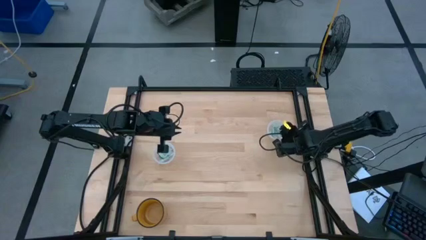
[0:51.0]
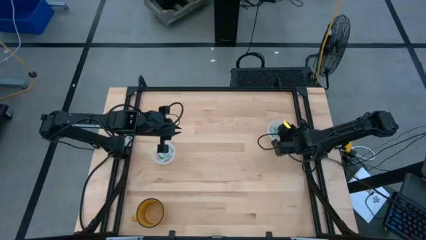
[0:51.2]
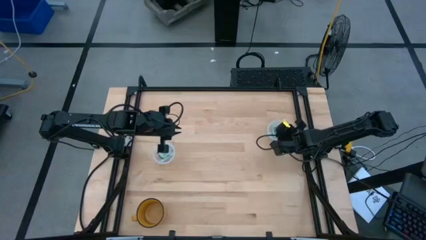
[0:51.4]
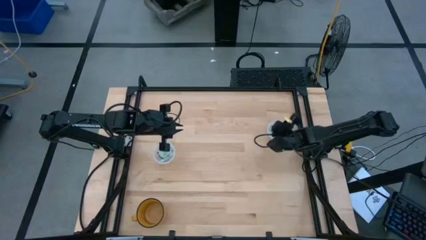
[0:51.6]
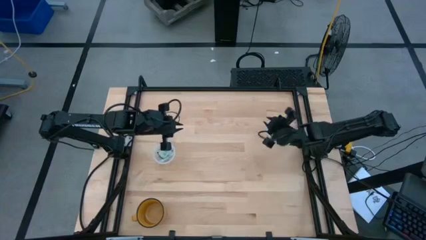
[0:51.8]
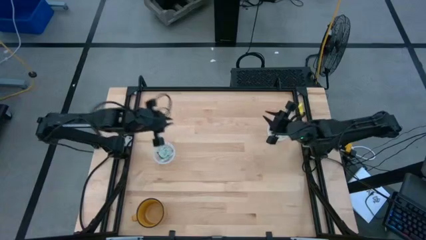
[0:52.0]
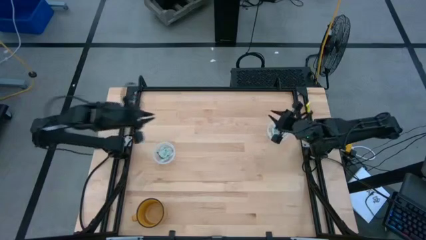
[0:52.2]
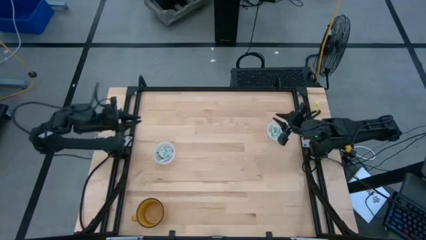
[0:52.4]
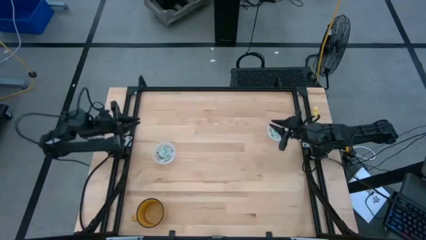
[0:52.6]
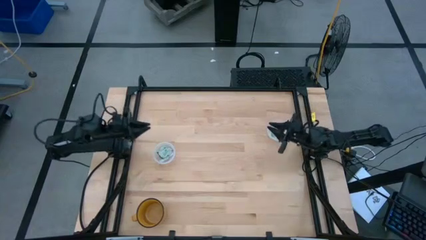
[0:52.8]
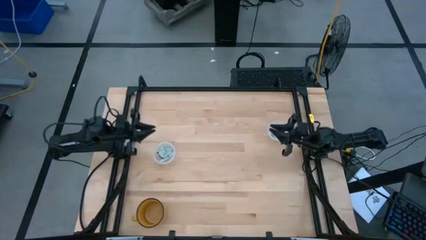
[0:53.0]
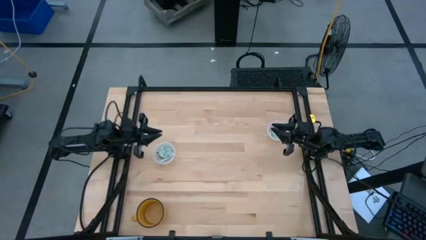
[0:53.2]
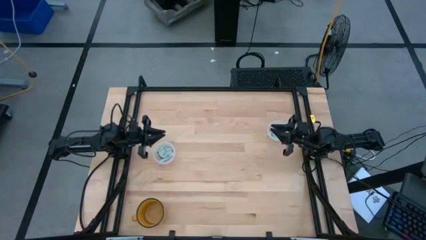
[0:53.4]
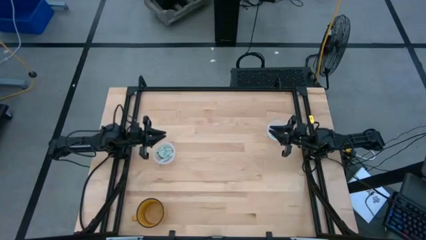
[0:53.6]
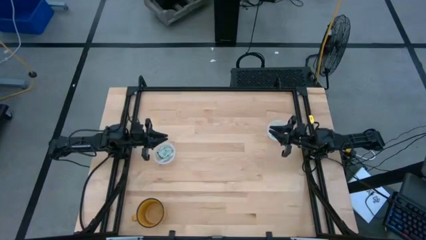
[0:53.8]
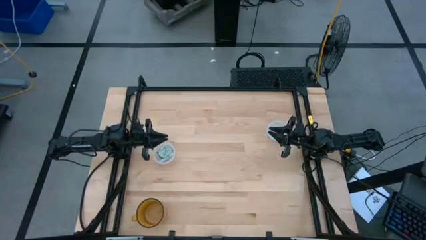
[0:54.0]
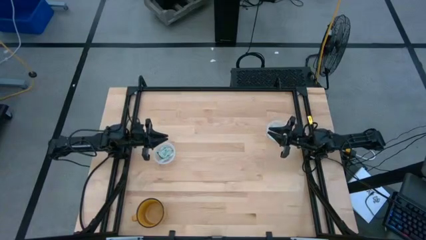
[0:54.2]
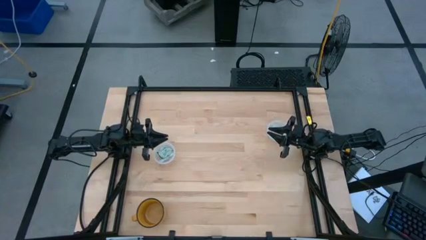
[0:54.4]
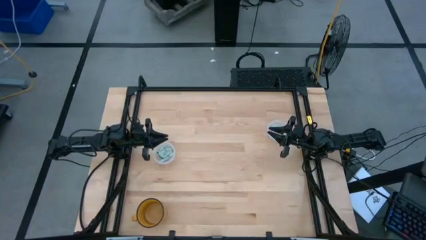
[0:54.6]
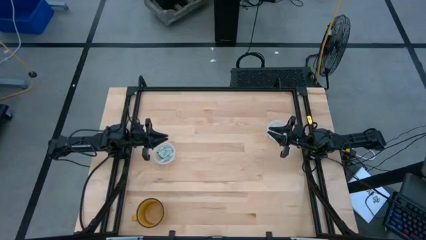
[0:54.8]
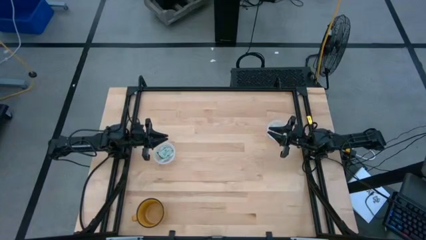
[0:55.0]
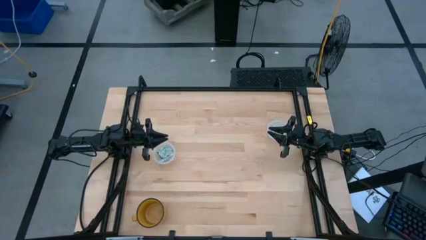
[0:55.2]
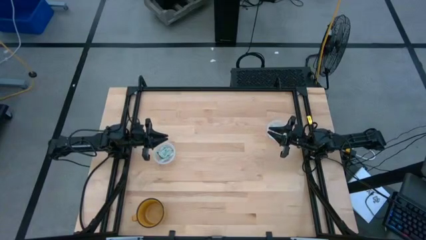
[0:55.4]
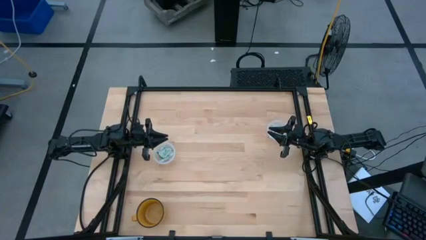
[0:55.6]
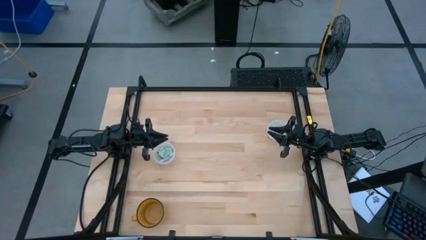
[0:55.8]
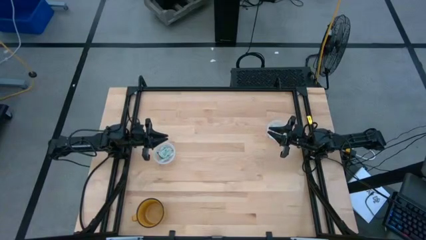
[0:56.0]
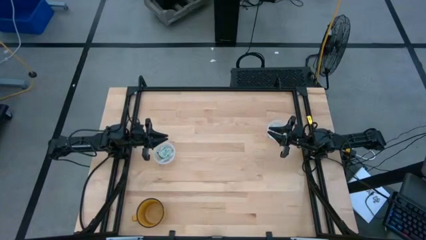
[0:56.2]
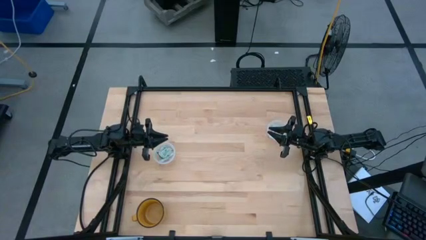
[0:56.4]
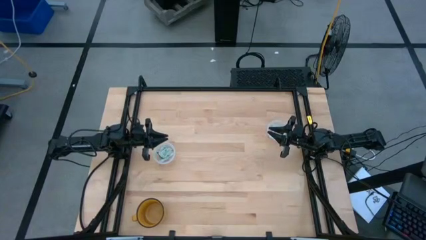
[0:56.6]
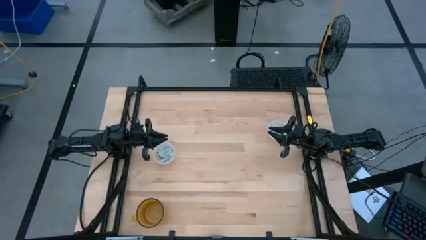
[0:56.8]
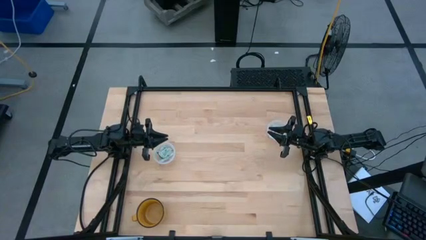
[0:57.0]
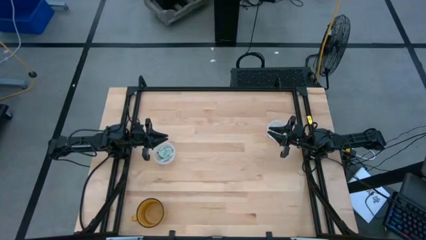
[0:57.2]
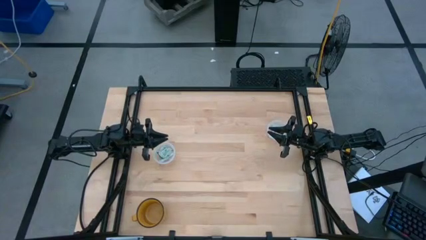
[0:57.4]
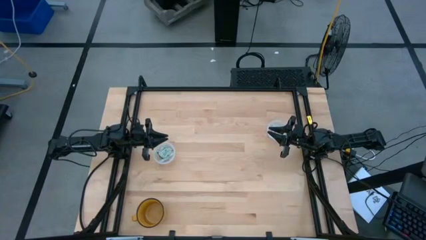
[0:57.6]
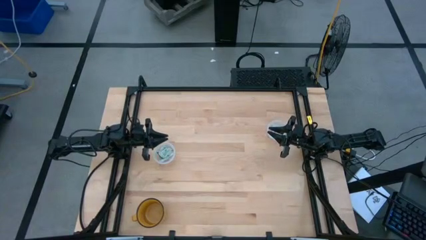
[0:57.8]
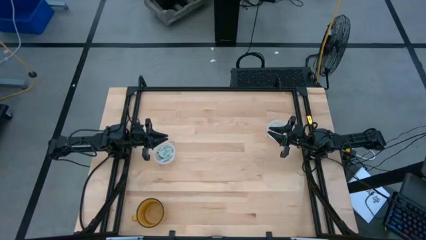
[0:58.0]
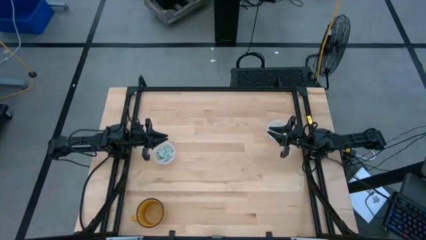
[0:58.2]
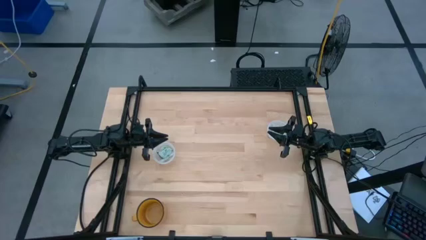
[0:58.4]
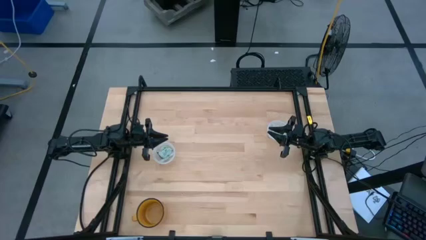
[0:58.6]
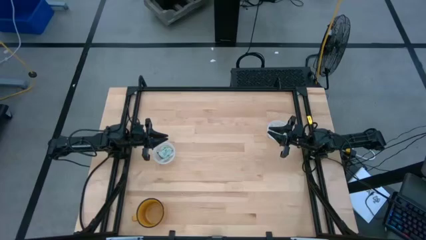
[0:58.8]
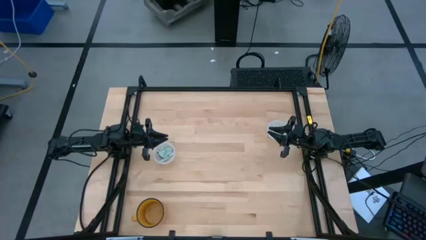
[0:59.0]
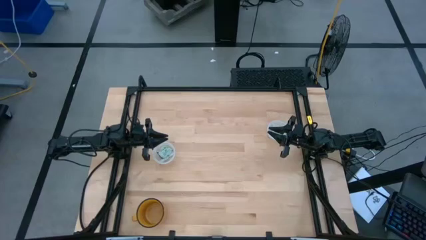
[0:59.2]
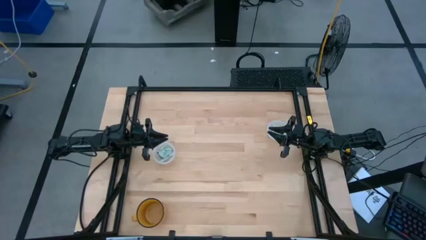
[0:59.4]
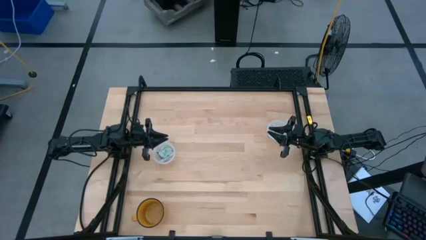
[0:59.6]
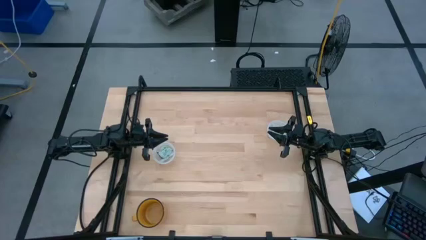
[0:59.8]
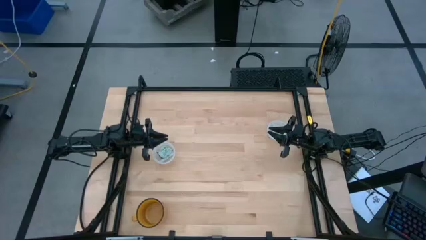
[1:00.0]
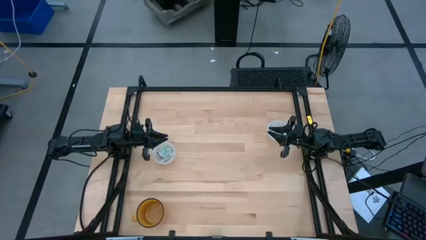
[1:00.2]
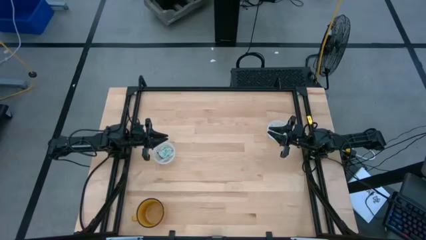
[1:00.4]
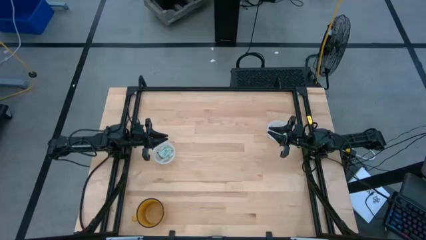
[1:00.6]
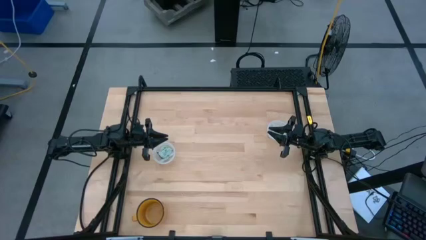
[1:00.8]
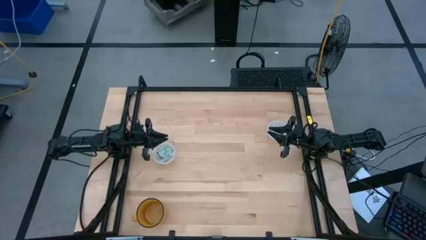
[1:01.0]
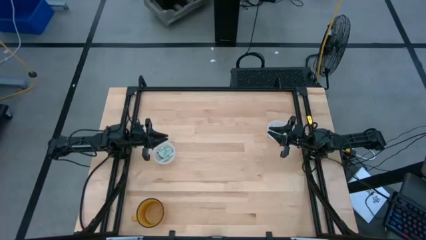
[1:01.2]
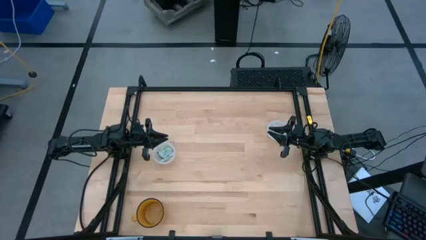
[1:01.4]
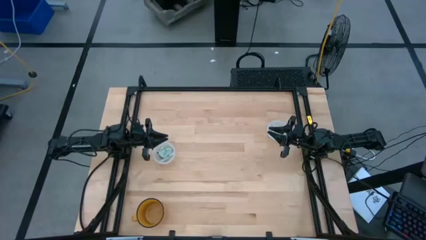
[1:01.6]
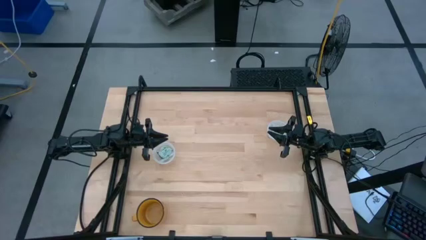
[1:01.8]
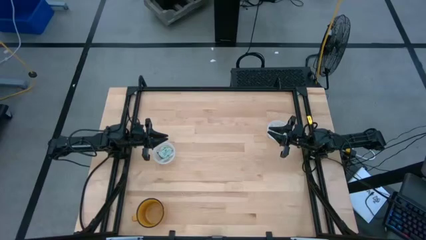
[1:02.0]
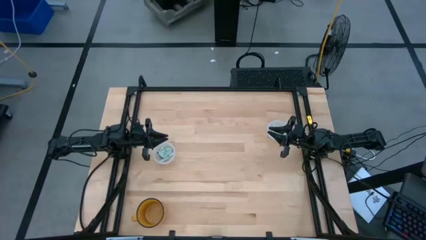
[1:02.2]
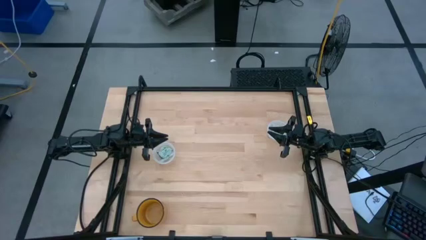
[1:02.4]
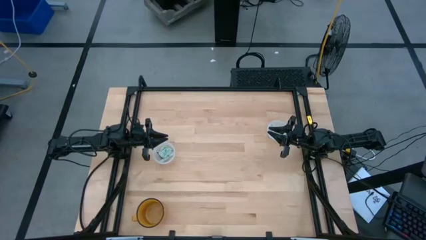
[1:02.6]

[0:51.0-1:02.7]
Task: Pick and place items into bin
Return to Home Position
